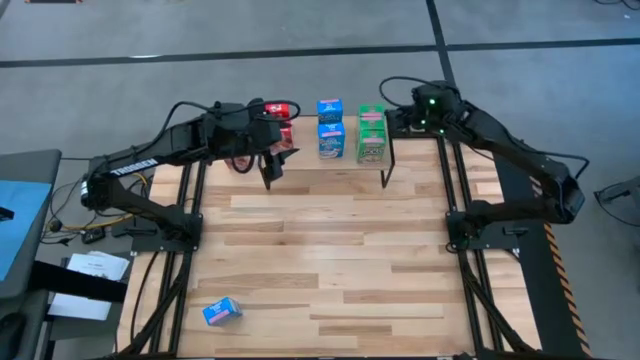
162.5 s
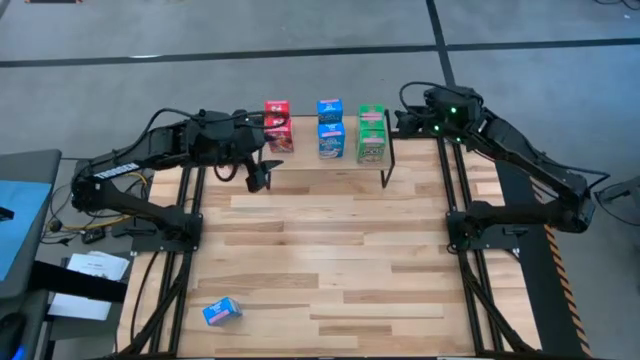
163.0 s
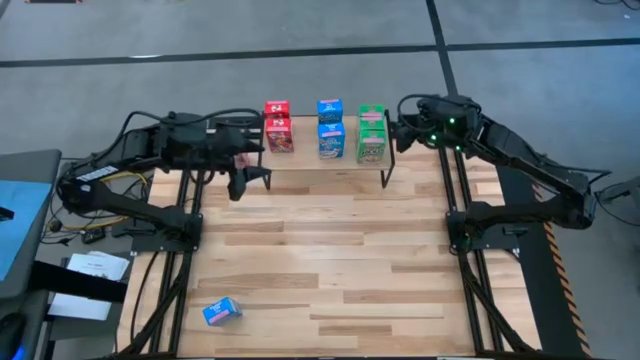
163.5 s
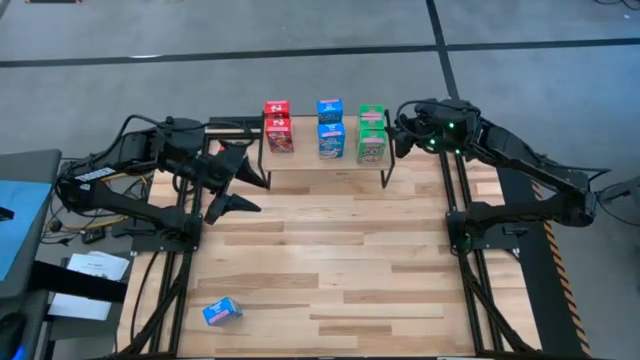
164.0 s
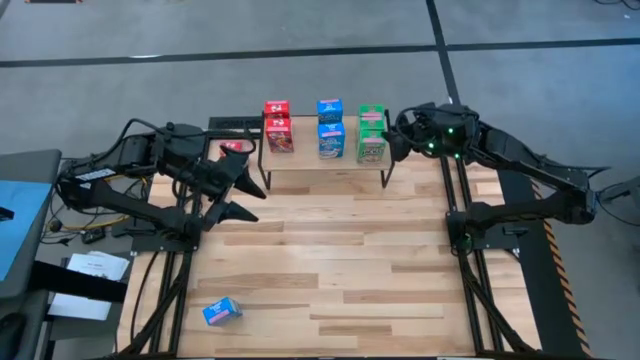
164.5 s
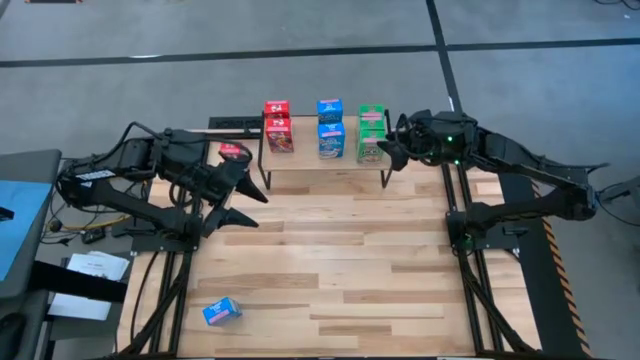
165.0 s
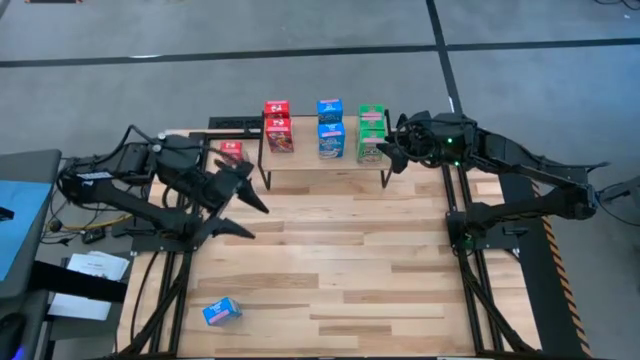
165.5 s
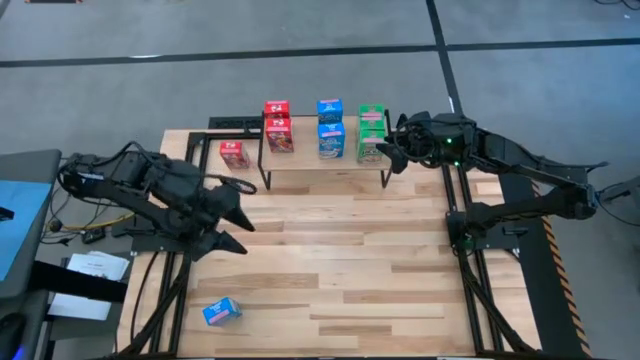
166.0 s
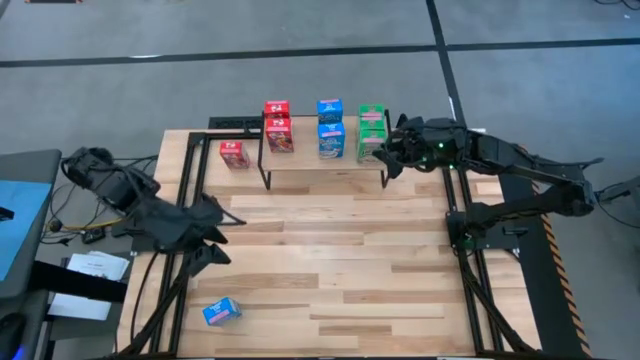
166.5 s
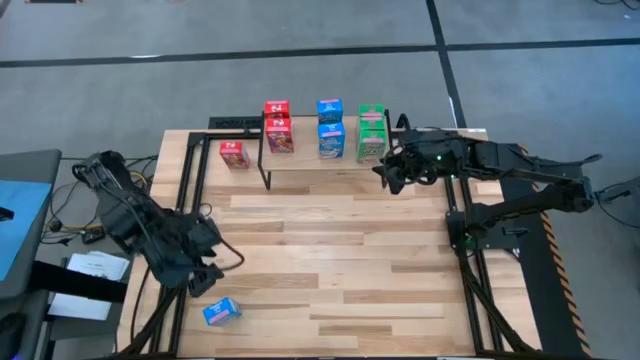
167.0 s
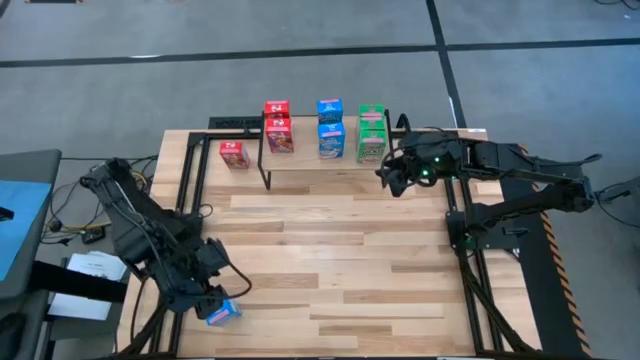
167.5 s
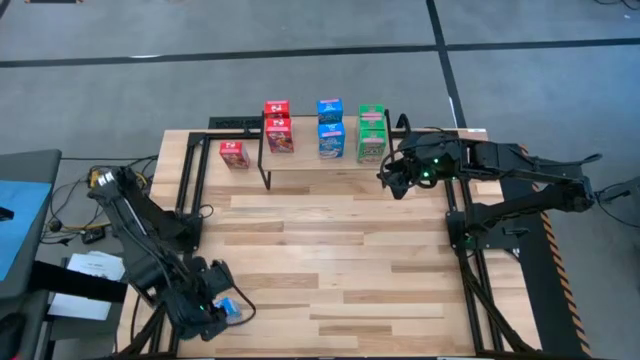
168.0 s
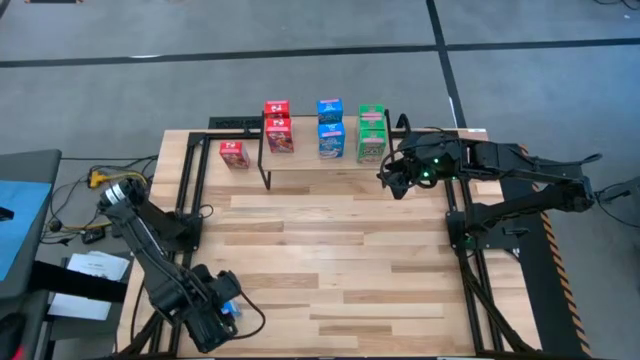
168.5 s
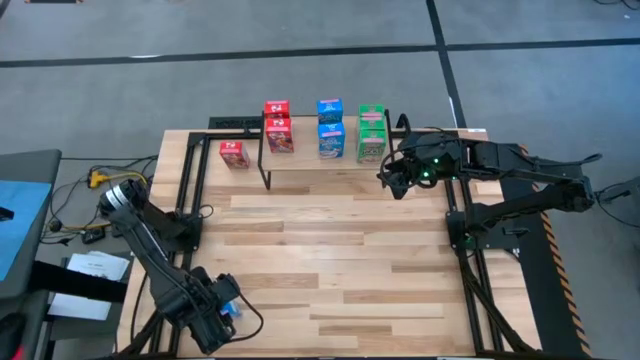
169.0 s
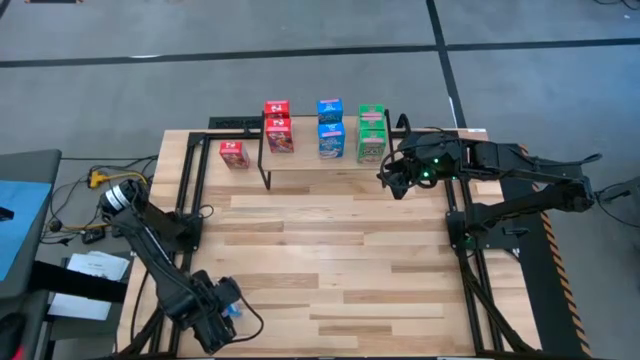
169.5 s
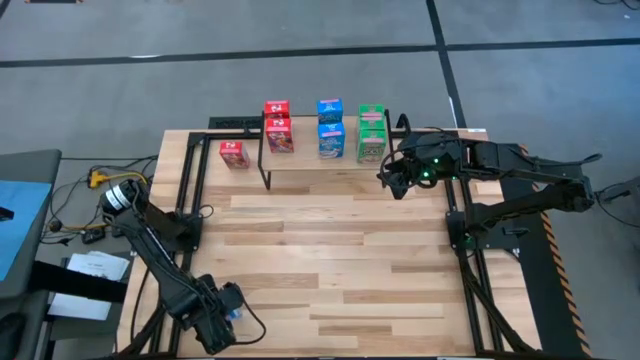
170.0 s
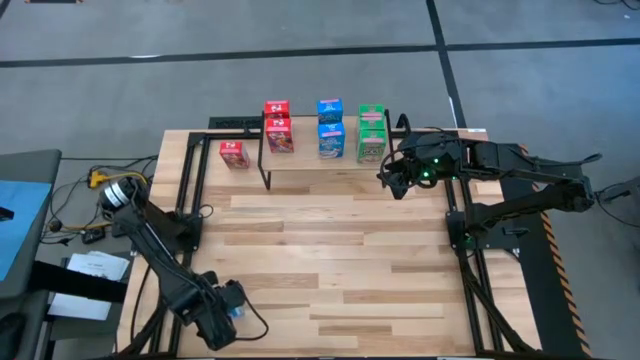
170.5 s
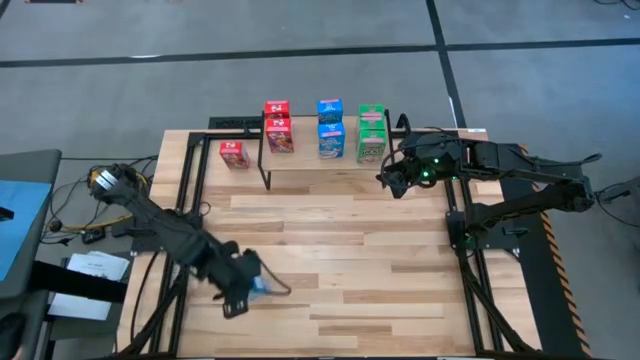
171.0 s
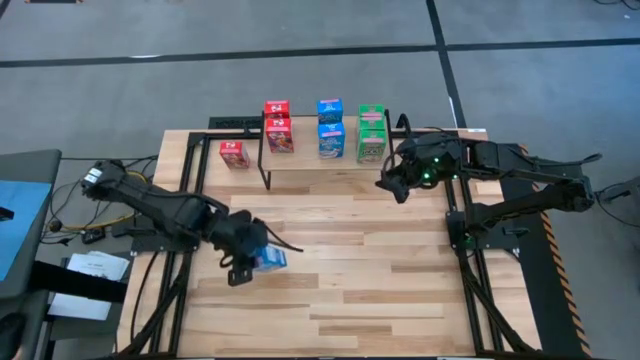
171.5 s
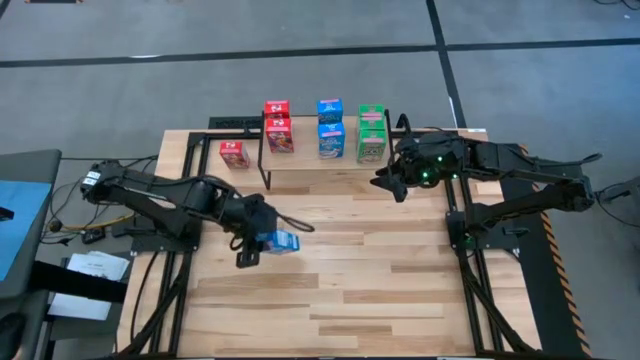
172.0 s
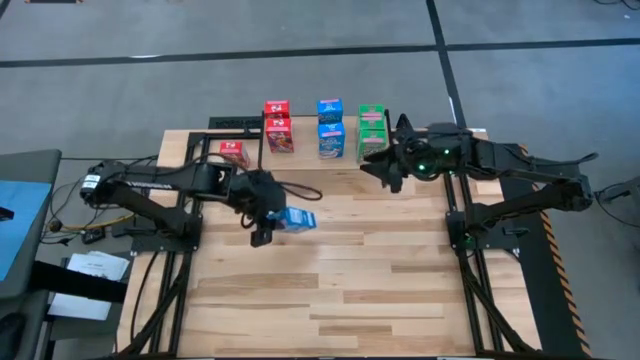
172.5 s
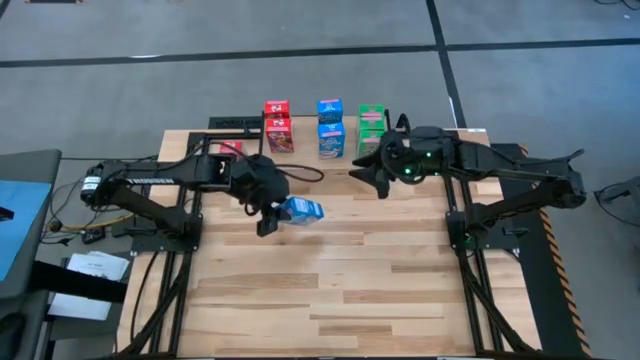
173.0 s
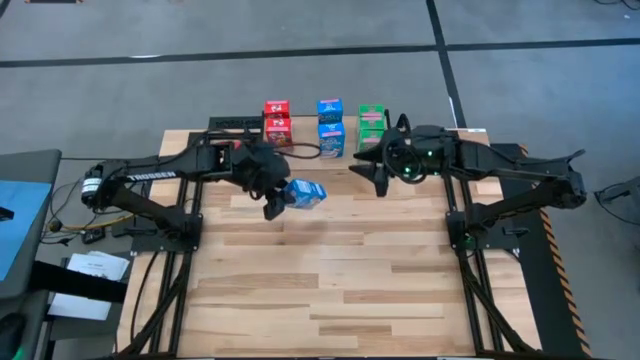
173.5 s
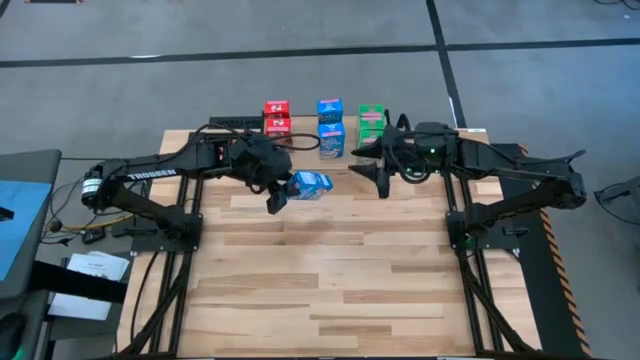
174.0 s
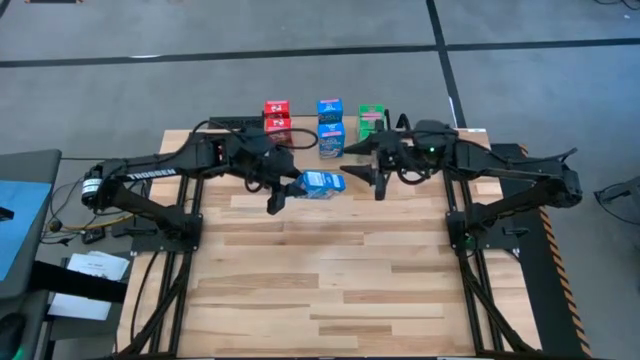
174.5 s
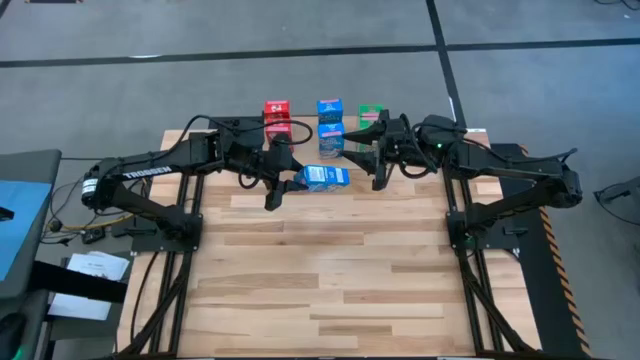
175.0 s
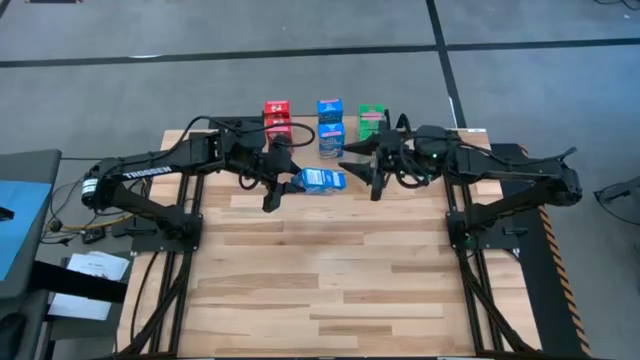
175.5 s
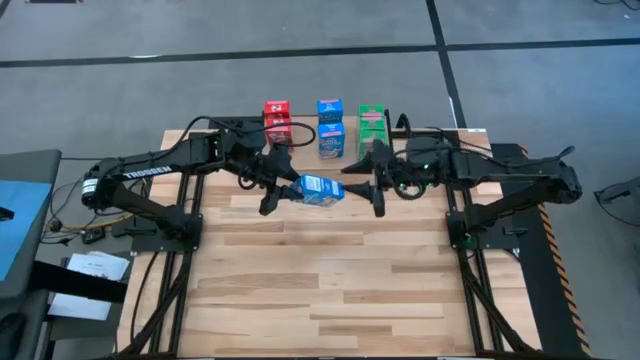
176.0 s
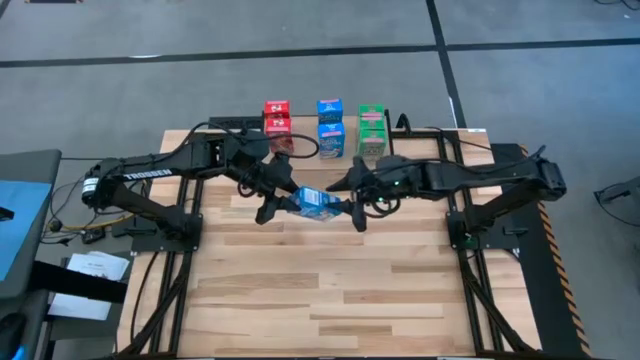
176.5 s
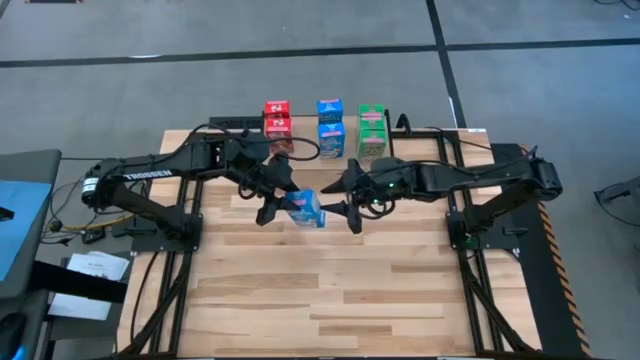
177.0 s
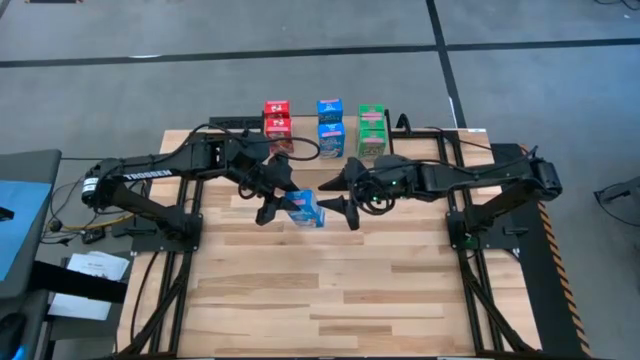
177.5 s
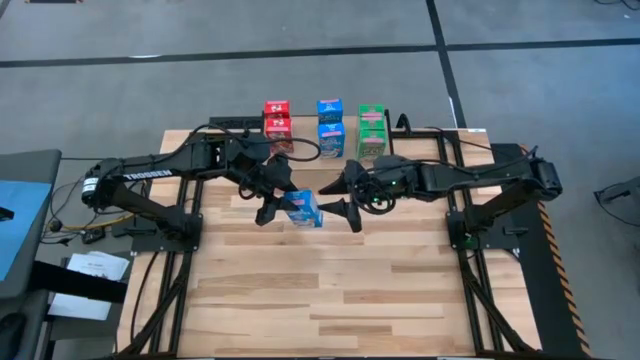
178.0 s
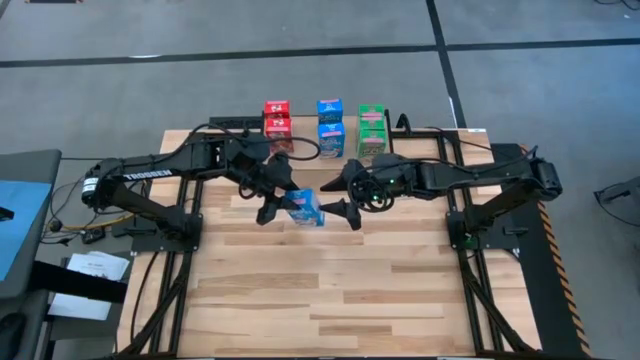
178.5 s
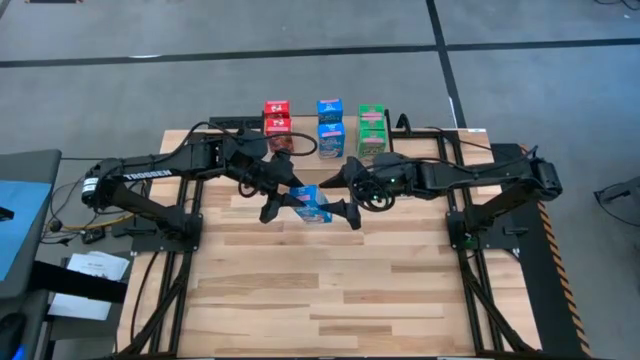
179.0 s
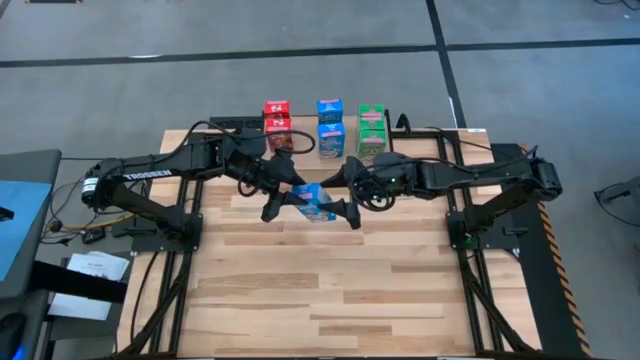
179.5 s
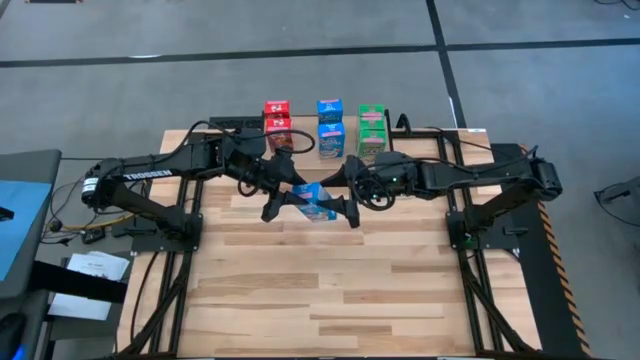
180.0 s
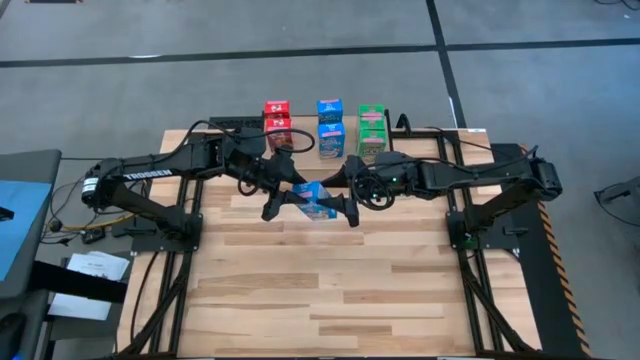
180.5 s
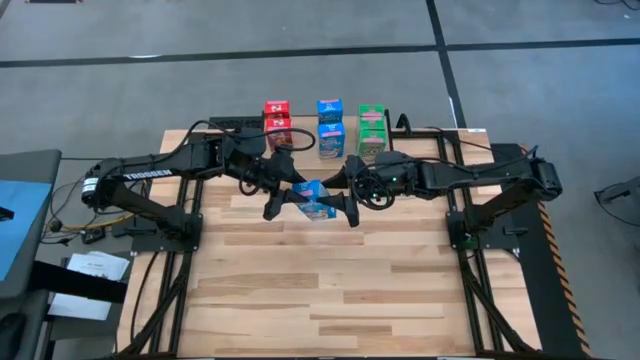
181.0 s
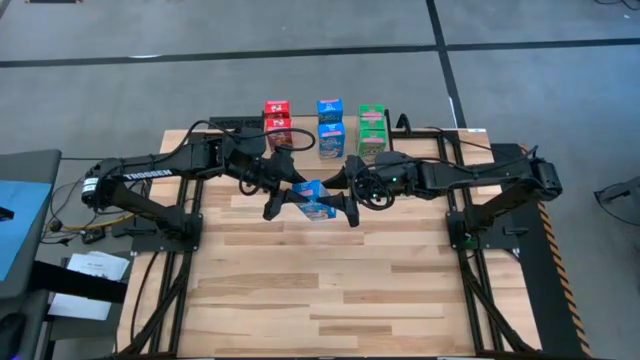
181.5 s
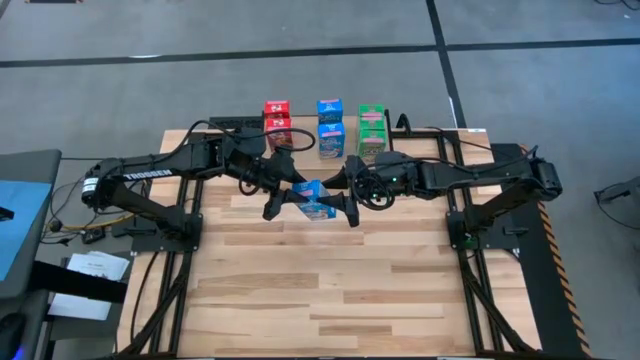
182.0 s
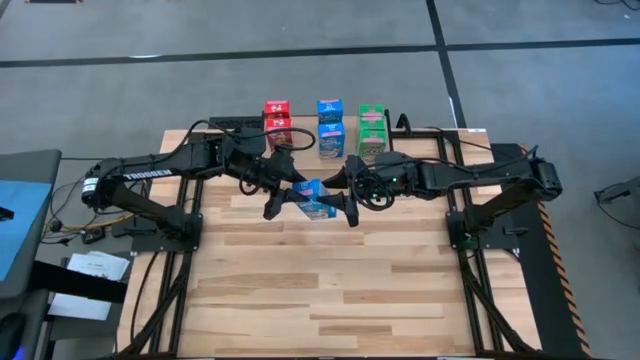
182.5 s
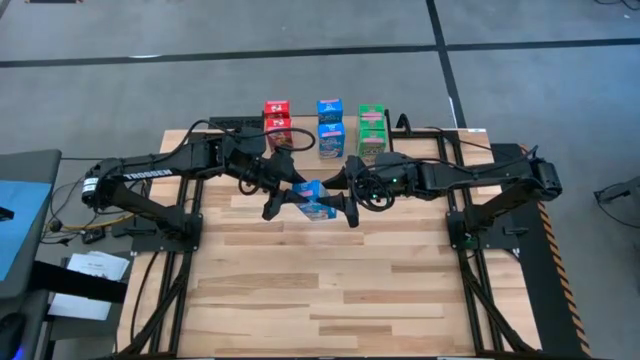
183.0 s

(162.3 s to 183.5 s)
Task: Stack cereal on shelf
Put the blue cereal box on the shelf aligned with the other blue cereal box
